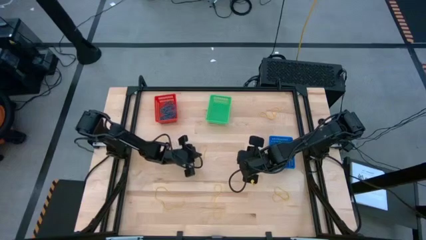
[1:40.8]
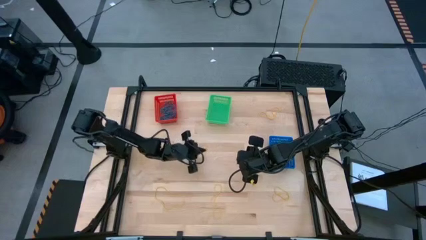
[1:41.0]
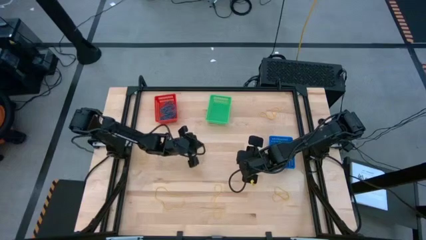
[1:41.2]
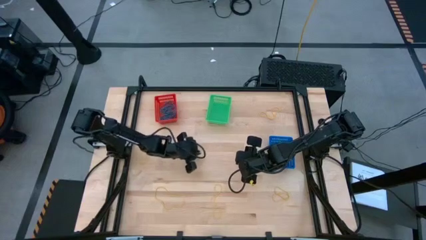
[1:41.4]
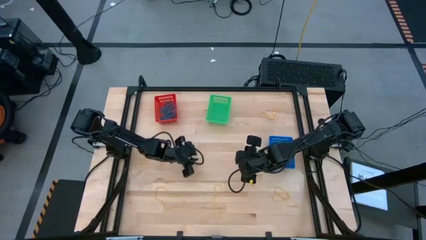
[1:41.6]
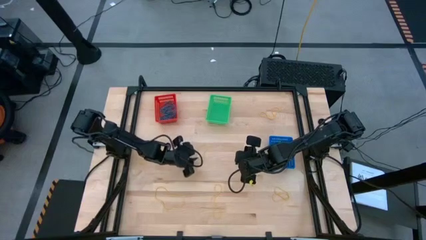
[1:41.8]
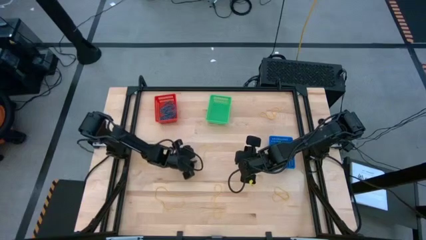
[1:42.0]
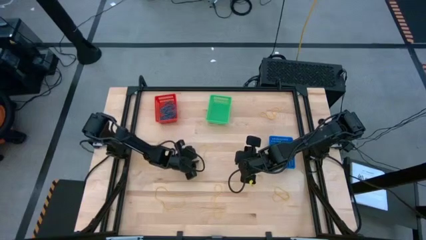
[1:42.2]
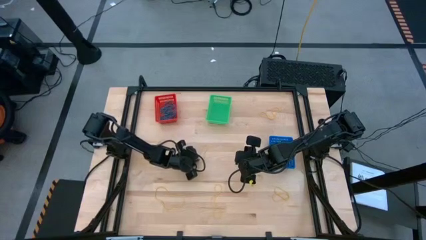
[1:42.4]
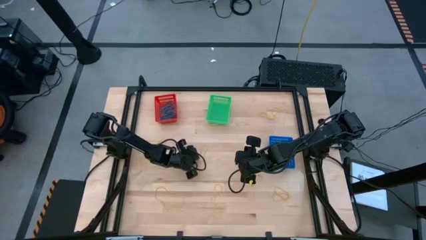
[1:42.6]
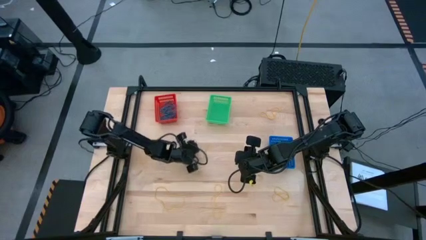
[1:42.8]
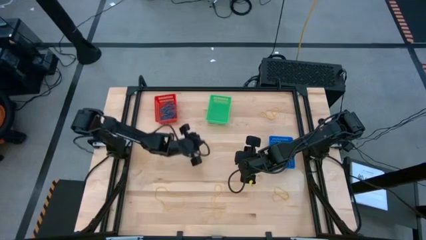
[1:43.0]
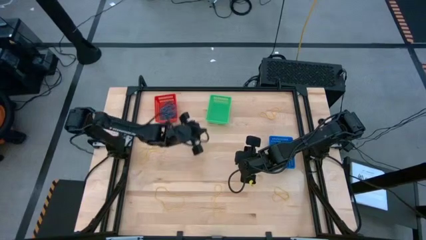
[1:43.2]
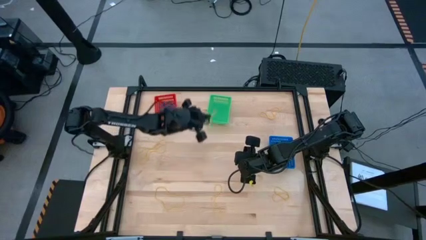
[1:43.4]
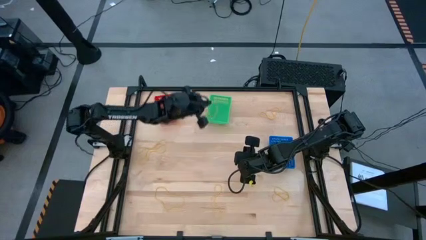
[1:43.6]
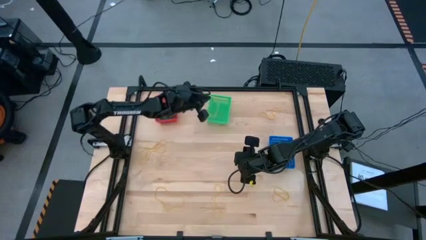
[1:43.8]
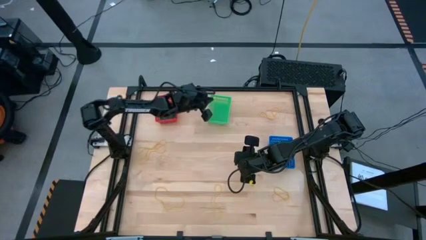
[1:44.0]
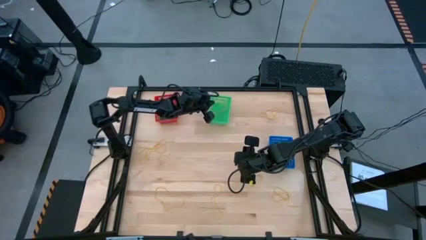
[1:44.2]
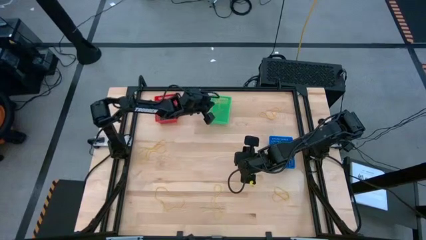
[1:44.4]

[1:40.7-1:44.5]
Task: Sort rubber bands into baskets
Put the yellow rubber band into the green bin

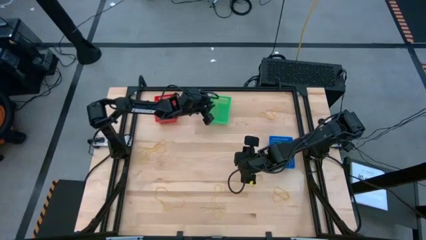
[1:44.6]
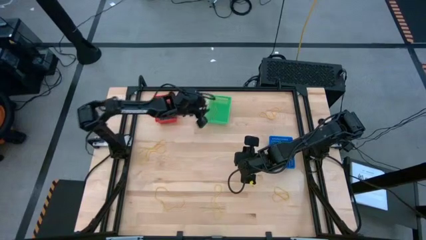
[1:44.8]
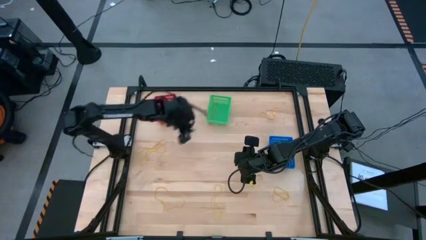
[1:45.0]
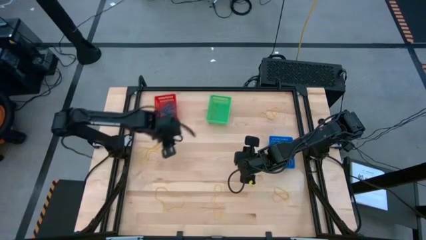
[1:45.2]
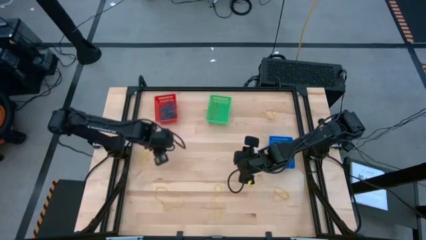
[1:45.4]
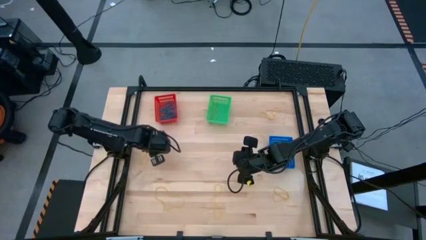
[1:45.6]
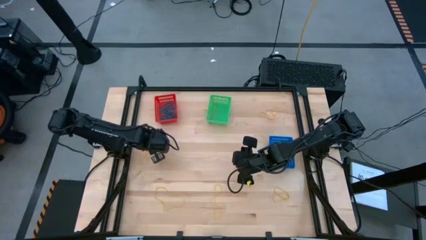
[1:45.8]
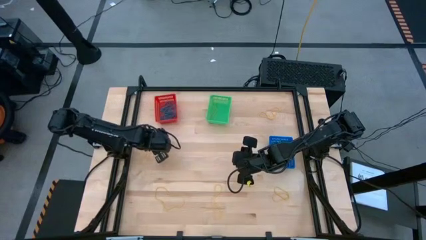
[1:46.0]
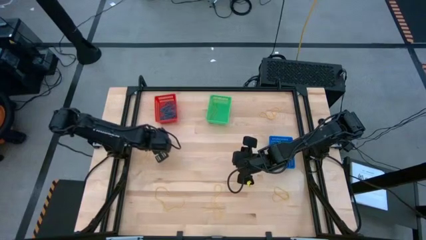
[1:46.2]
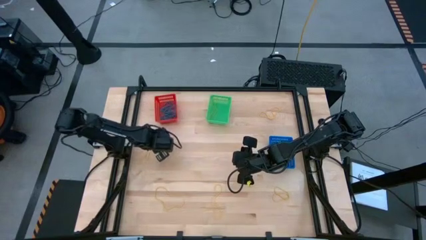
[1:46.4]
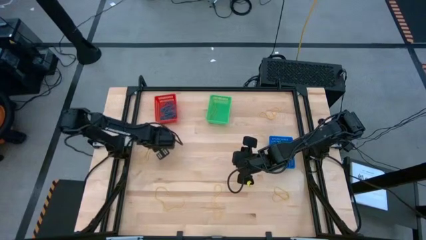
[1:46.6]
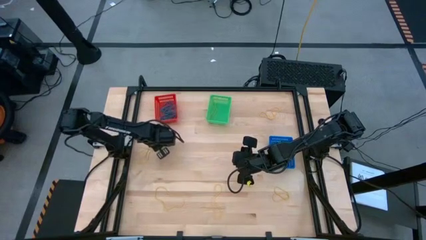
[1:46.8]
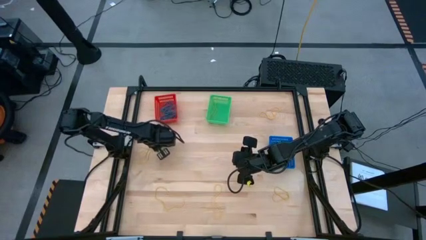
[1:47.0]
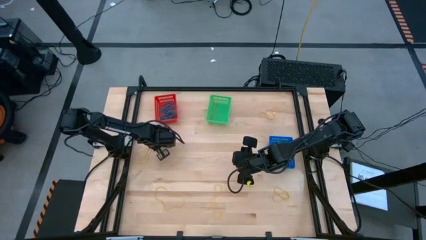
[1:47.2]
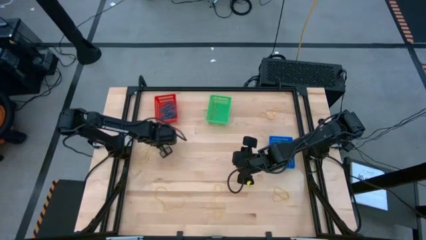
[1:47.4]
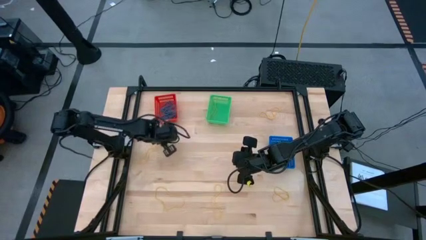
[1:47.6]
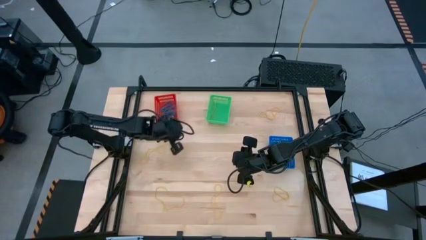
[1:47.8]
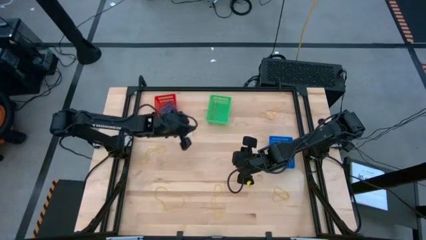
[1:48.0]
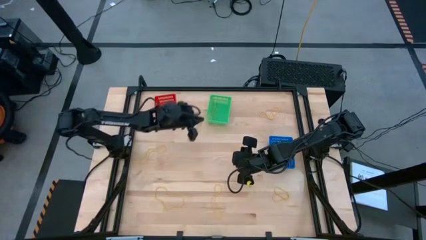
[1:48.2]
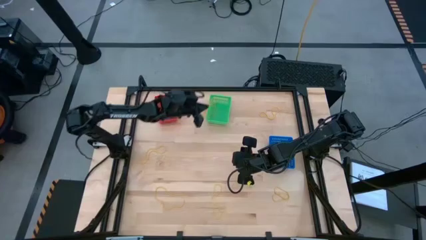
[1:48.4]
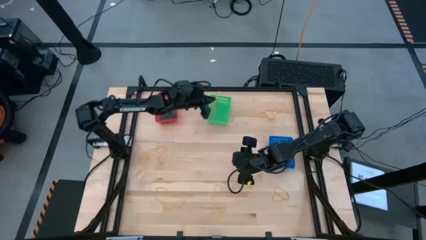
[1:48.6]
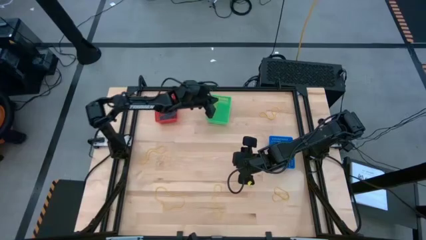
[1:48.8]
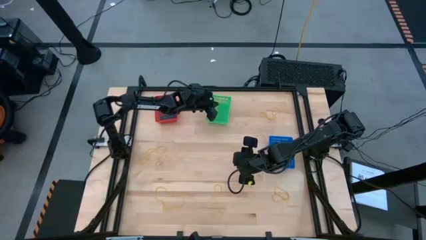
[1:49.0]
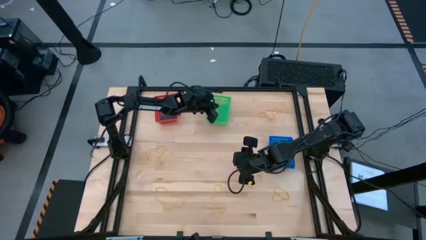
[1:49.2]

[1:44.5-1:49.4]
Put the yellow rubber band into the green bin

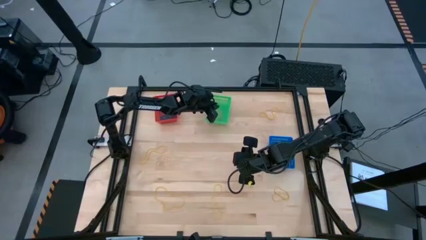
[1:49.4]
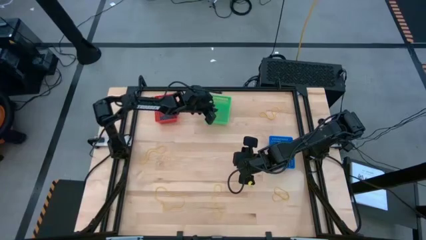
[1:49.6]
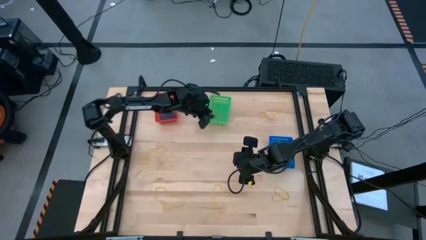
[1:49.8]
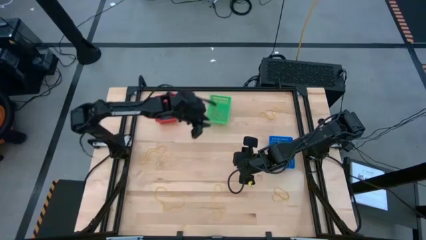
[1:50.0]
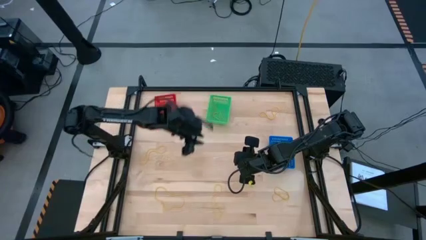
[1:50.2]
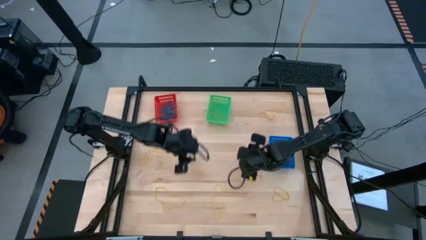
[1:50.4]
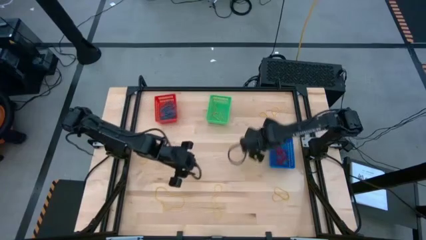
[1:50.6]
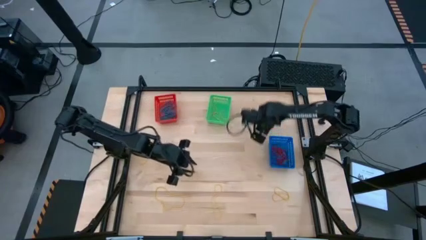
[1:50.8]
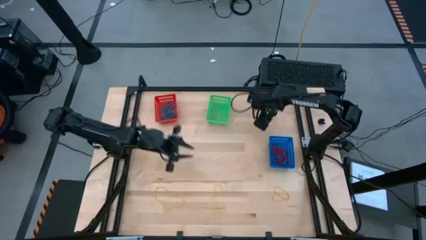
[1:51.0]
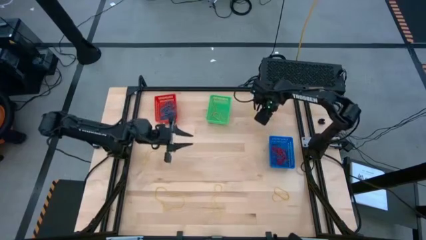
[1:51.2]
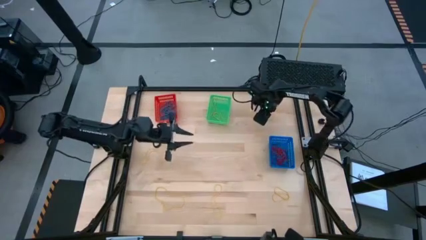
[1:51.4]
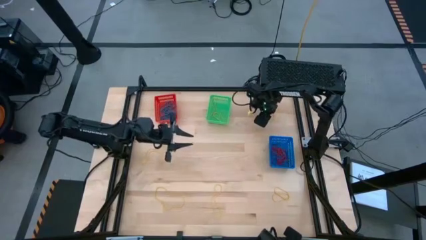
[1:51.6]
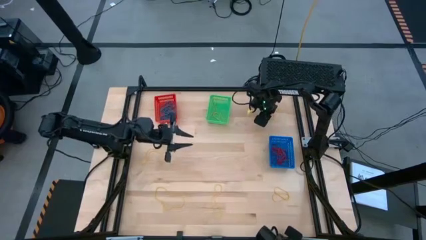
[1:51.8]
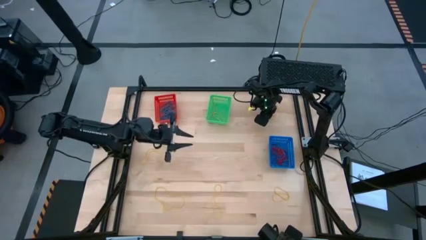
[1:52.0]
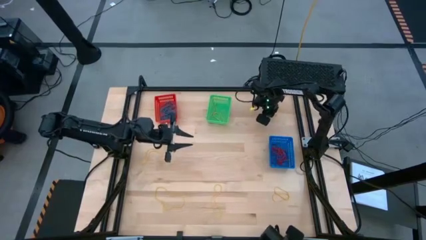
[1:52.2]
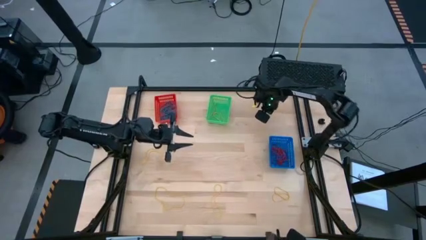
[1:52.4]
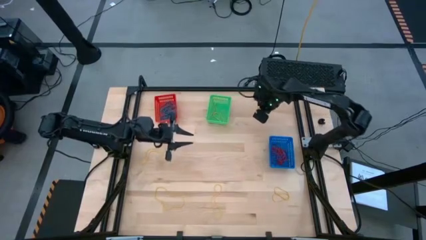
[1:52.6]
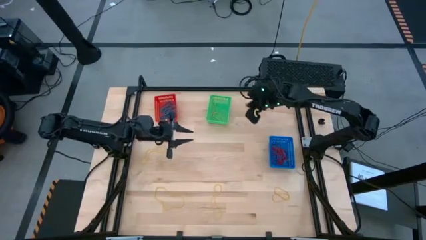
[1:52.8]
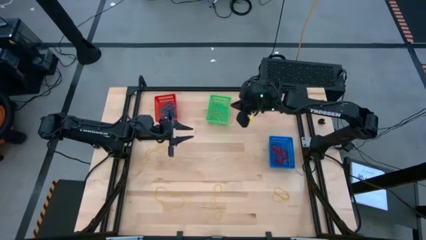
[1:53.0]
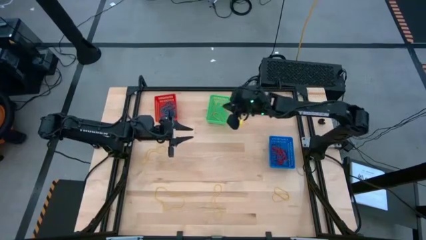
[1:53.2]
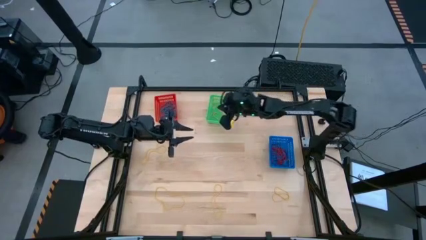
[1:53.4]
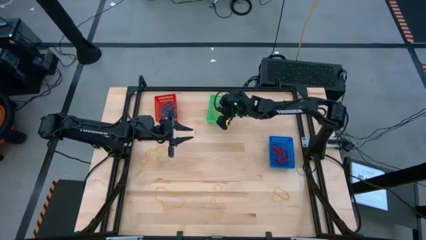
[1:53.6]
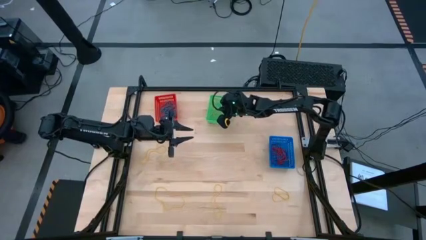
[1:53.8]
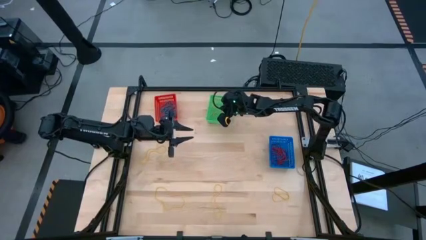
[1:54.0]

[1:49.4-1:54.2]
Put the yellow rubber band into the green bin

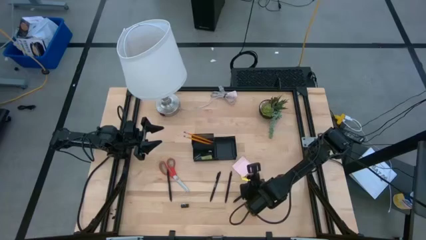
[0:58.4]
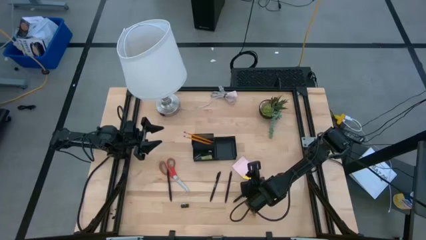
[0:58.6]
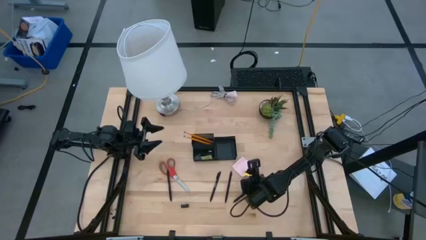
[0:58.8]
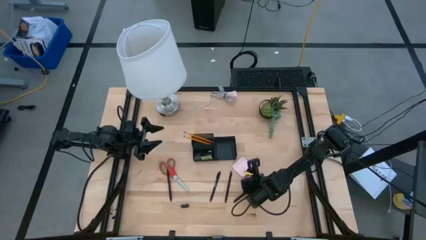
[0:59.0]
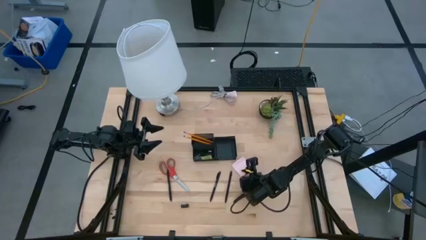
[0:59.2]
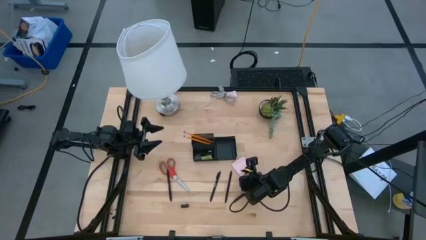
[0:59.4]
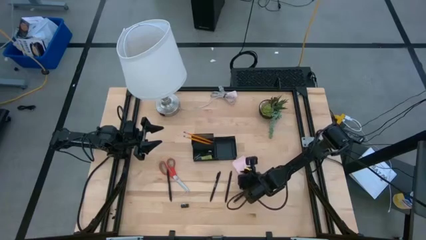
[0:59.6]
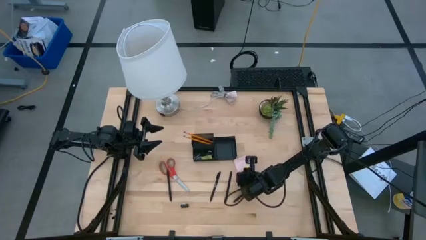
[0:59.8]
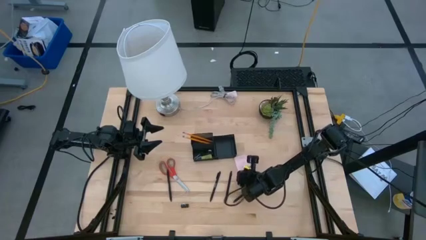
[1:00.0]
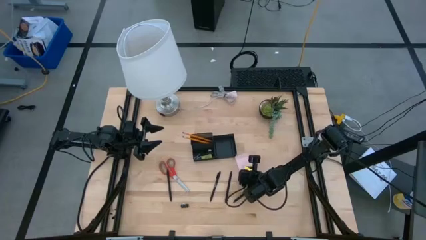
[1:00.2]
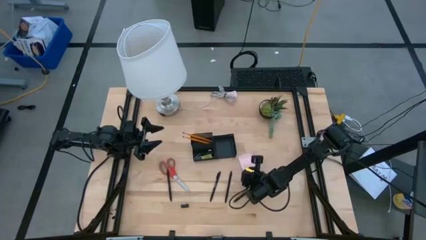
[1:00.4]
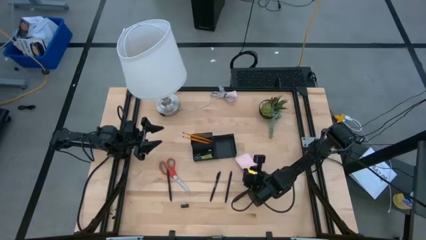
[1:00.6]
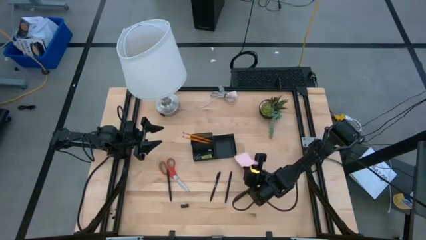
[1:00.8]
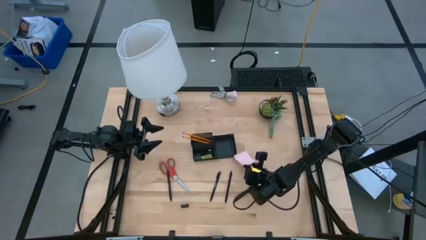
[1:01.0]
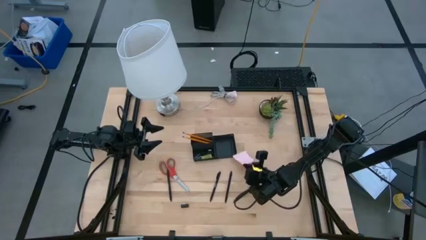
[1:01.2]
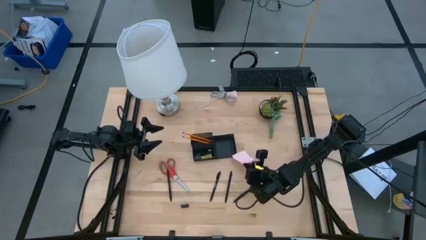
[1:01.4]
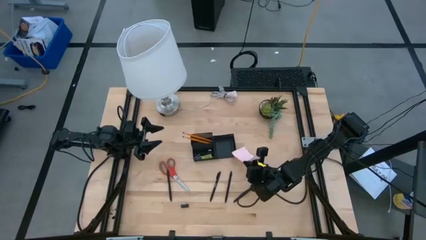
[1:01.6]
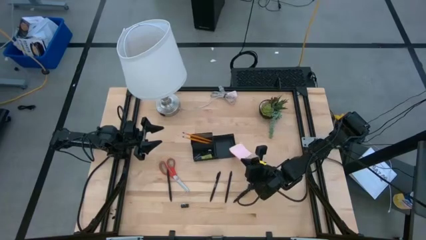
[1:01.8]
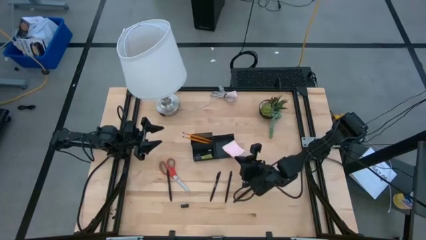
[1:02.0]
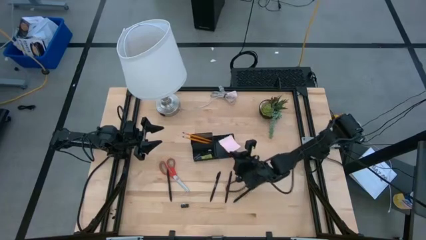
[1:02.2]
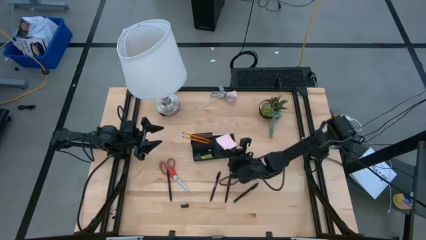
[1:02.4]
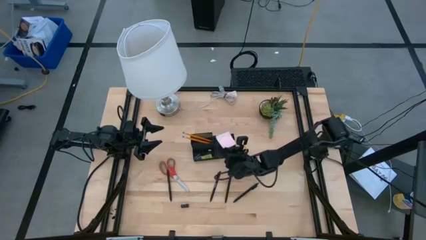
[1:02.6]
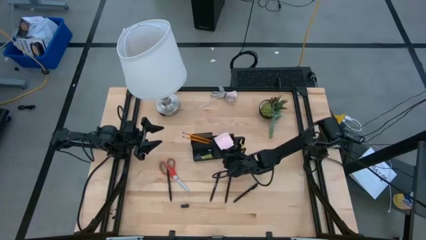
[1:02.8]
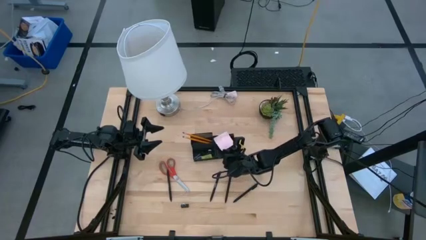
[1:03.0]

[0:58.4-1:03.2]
Task: Pick and place office supplies into organizer
Put the pink sticky notes into the black desk organizer
